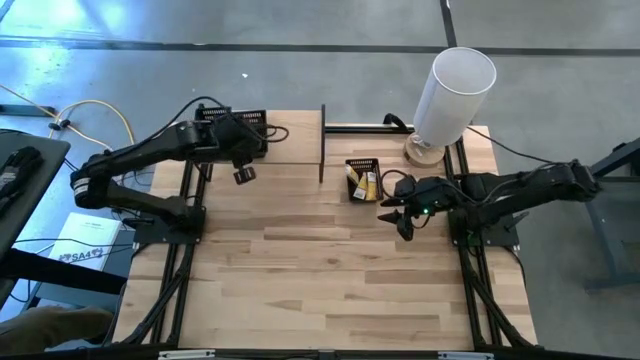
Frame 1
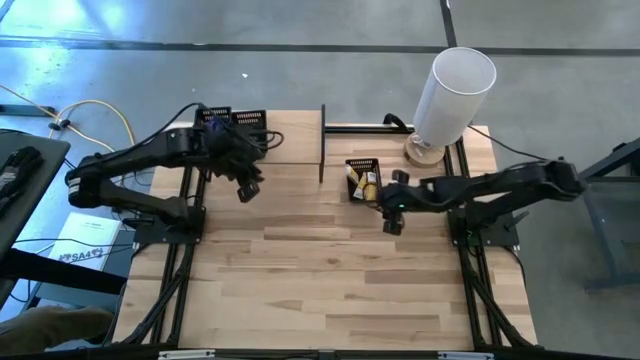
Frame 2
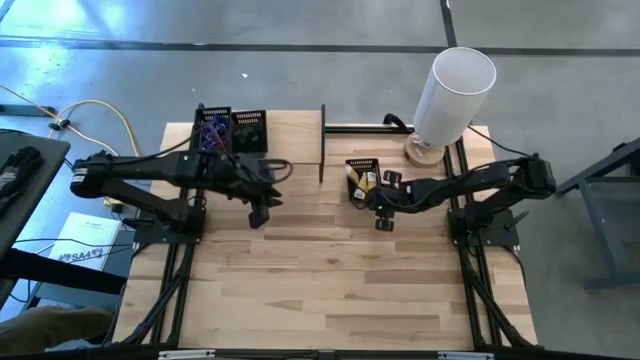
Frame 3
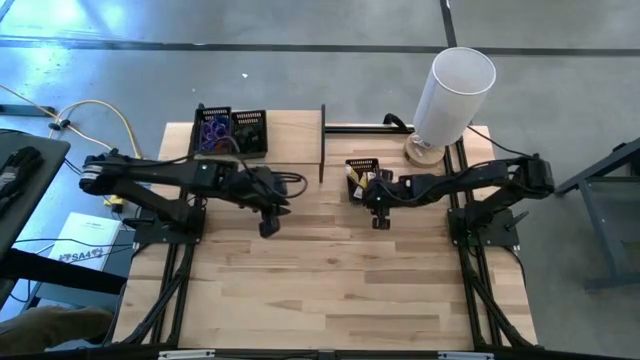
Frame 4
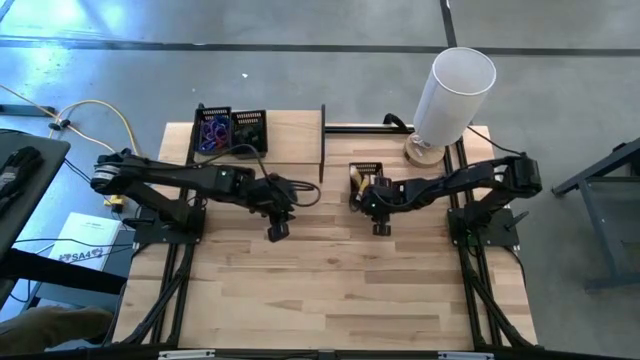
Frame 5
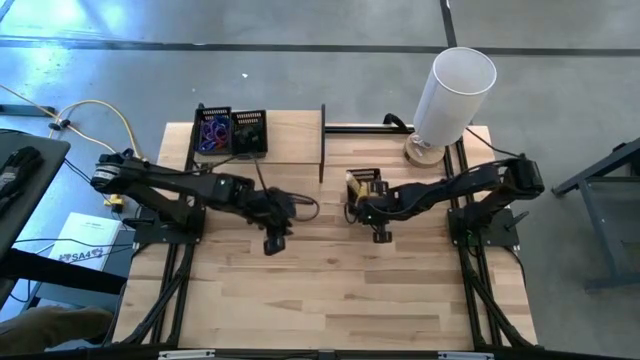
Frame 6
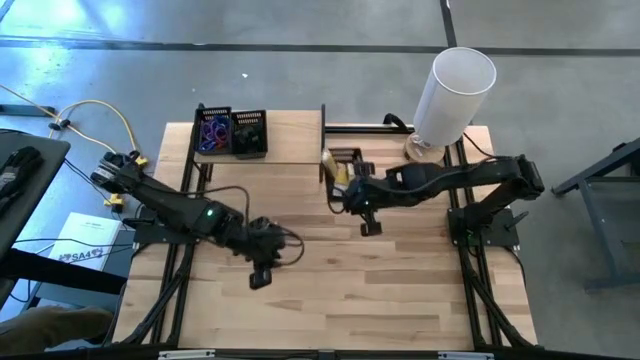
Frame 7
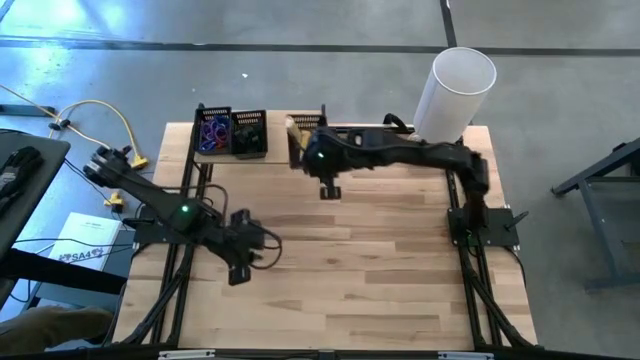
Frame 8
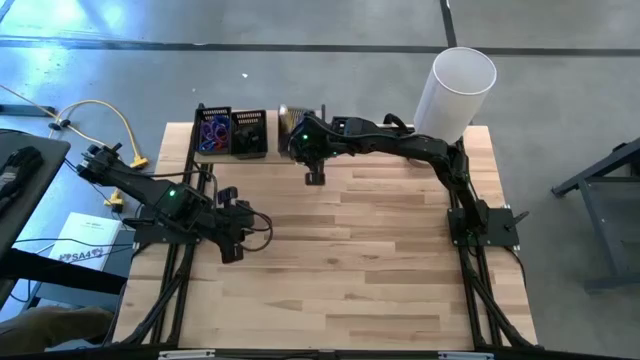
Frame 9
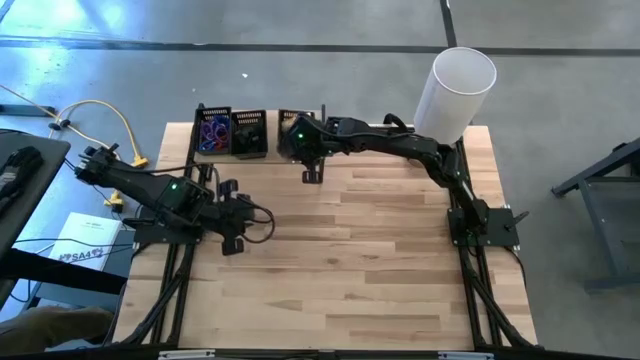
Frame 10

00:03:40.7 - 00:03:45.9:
Task: Pick & Place Office Desk Supplies
Put the black bin with crayon boxes on the shelf

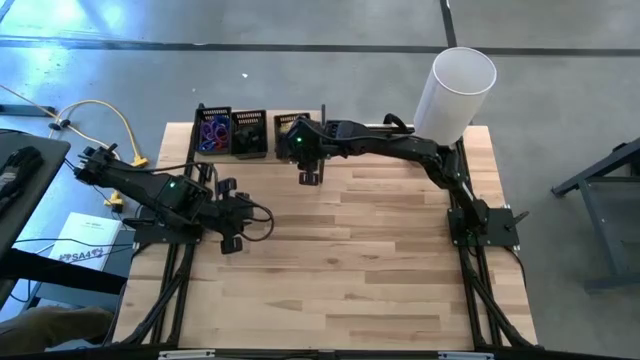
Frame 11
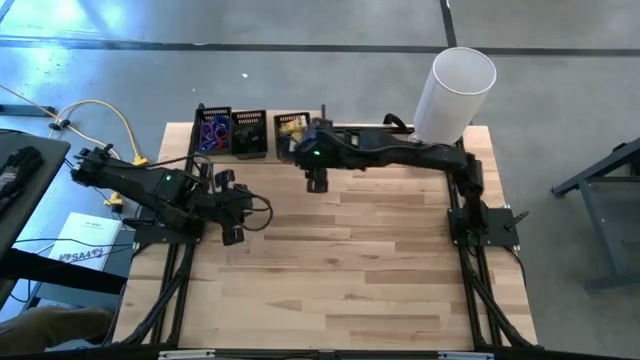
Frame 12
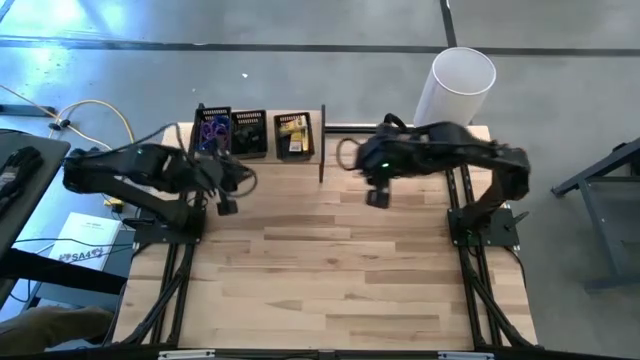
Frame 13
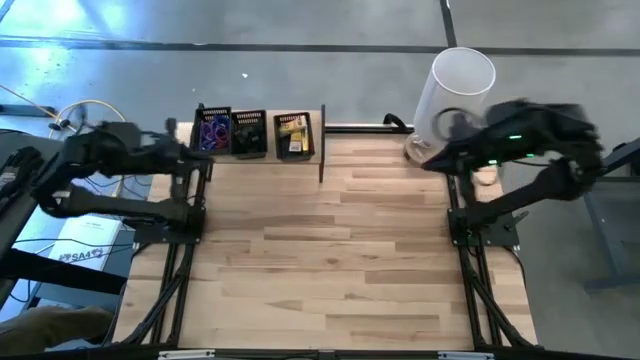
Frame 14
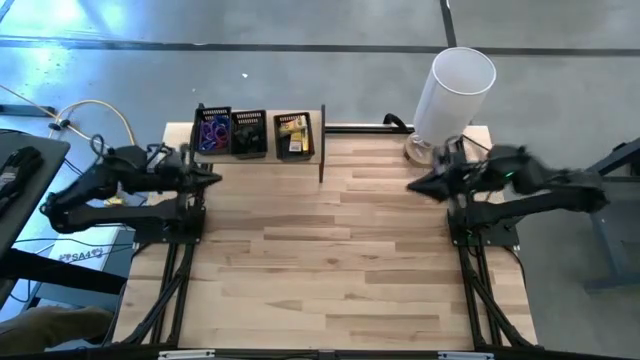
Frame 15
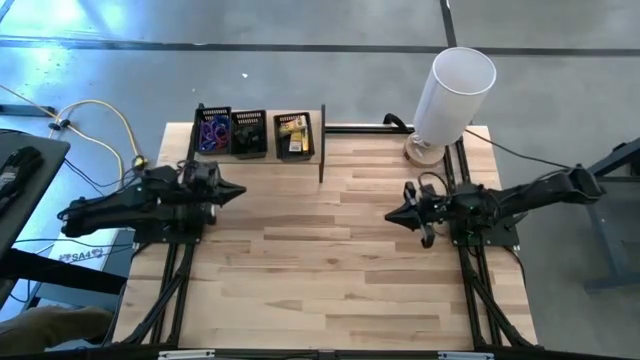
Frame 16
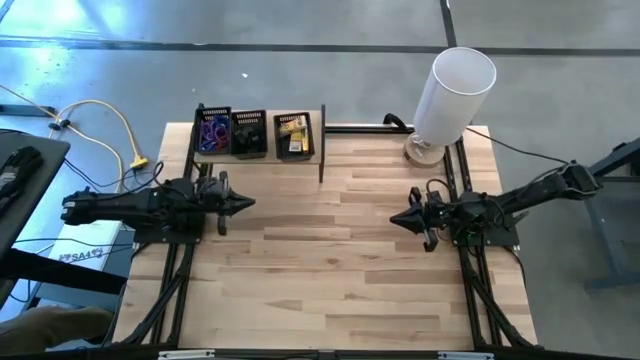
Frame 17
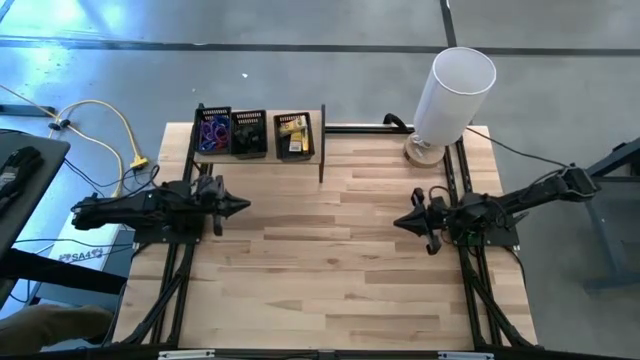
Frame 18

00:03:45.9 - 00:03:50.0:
Return to Home Position

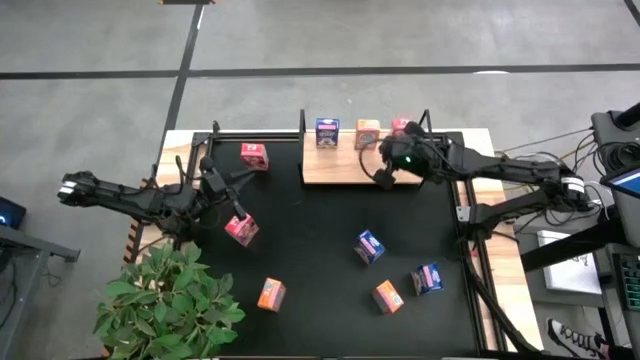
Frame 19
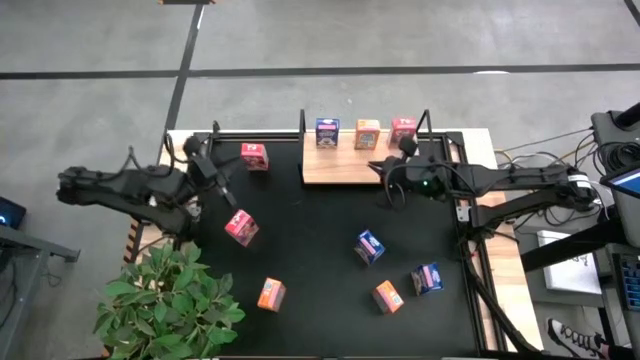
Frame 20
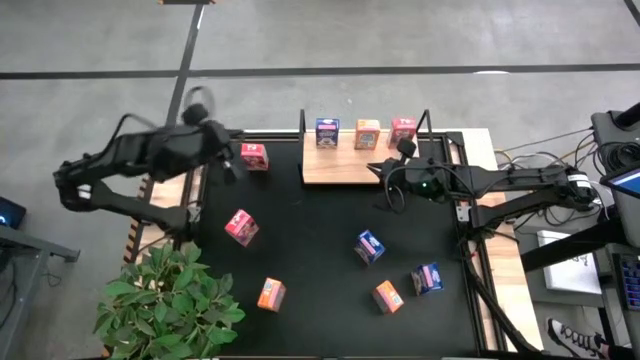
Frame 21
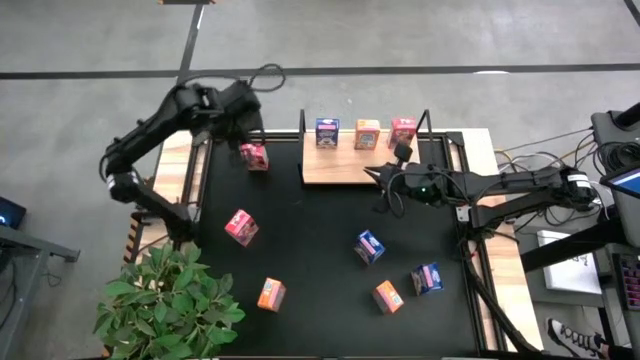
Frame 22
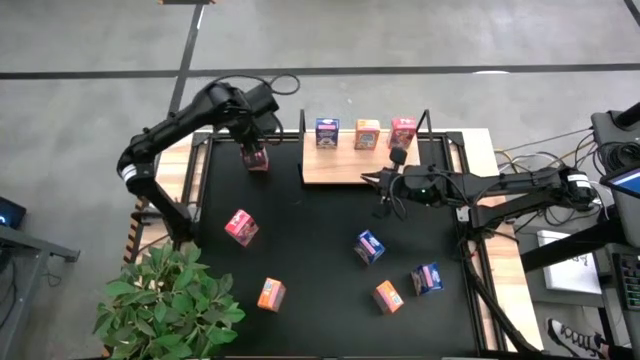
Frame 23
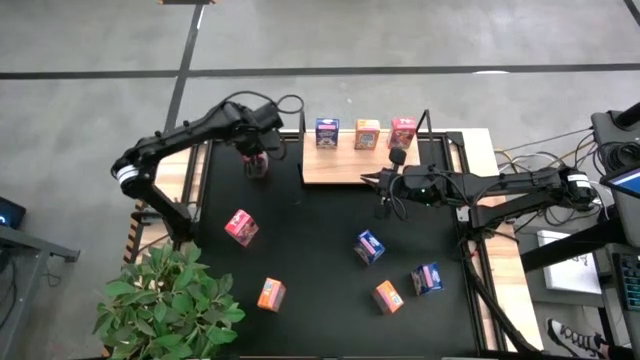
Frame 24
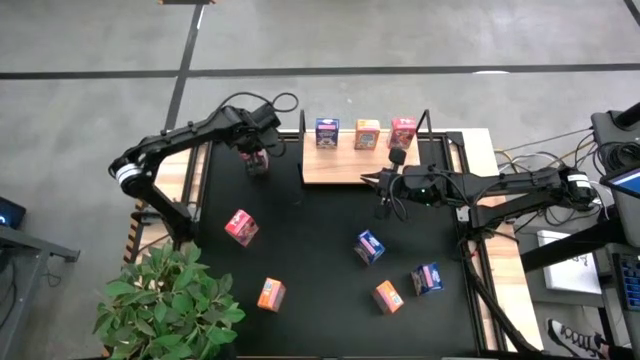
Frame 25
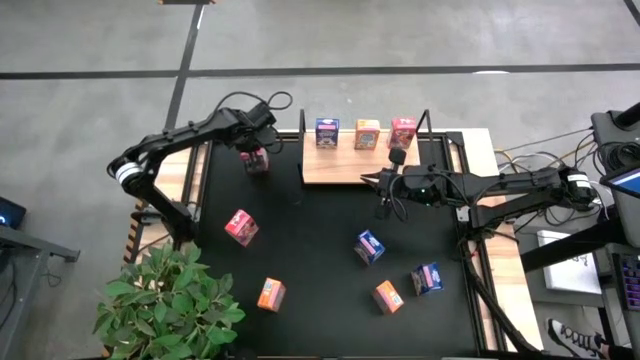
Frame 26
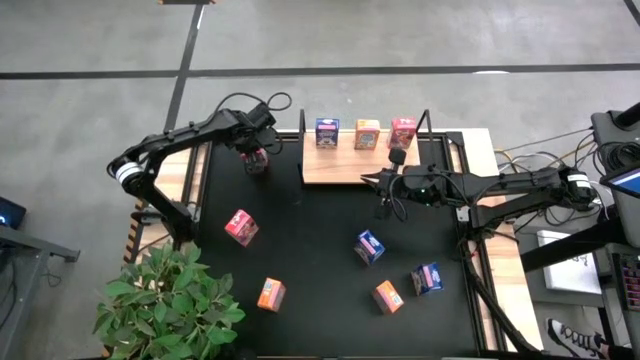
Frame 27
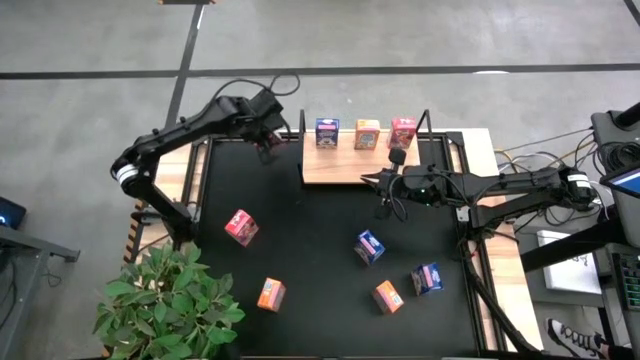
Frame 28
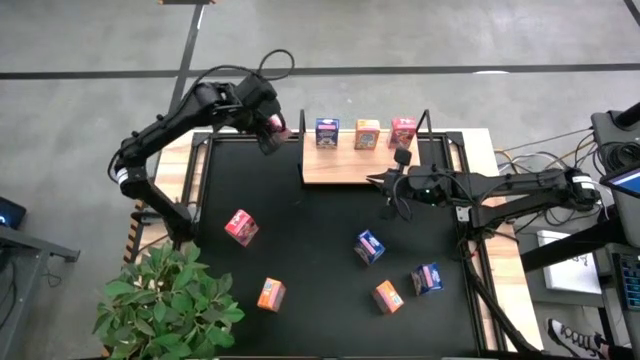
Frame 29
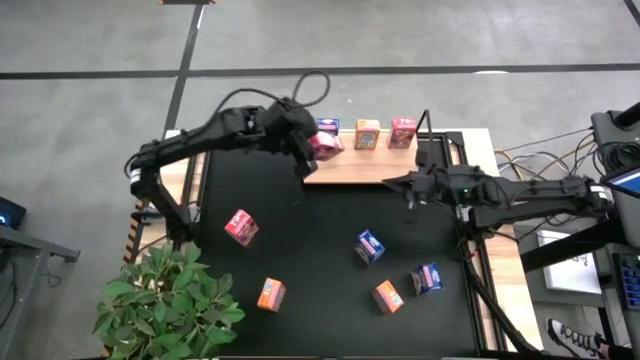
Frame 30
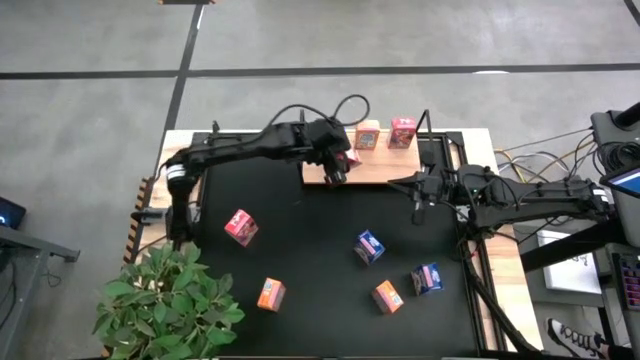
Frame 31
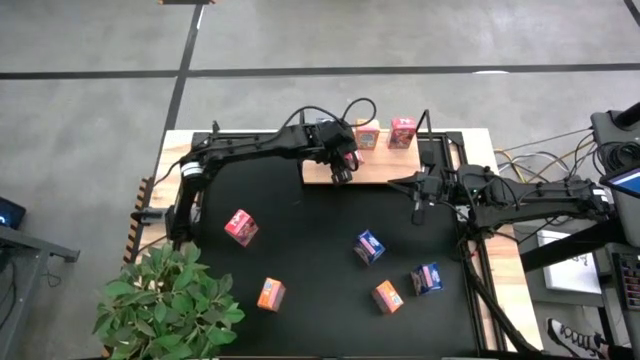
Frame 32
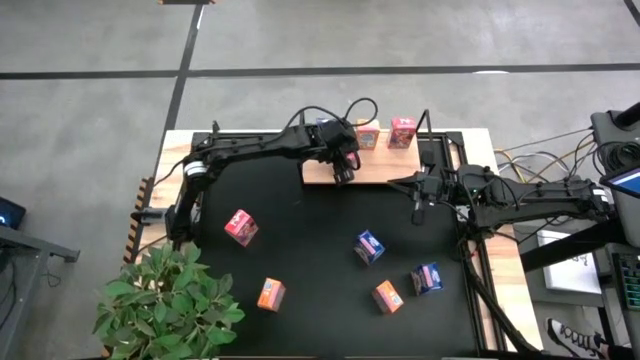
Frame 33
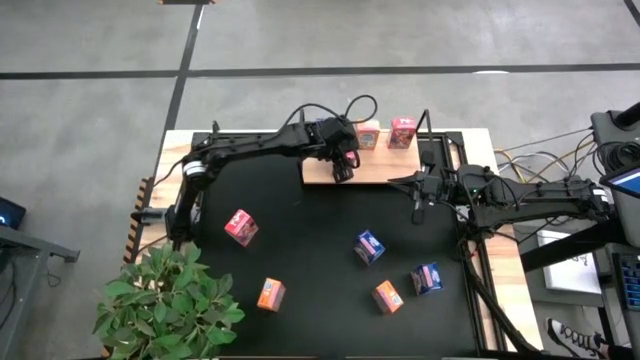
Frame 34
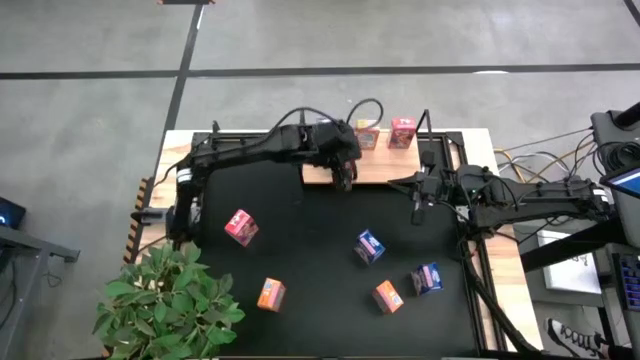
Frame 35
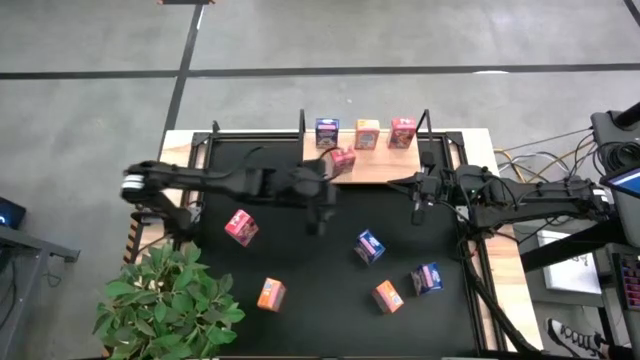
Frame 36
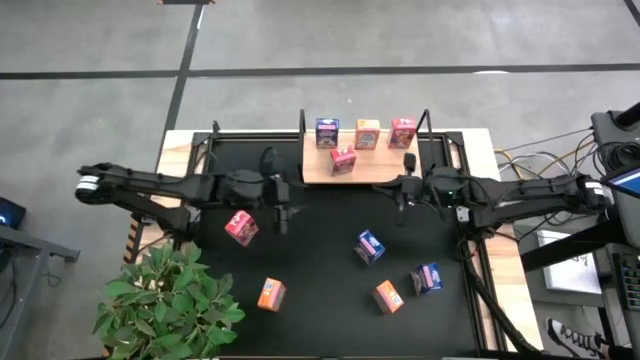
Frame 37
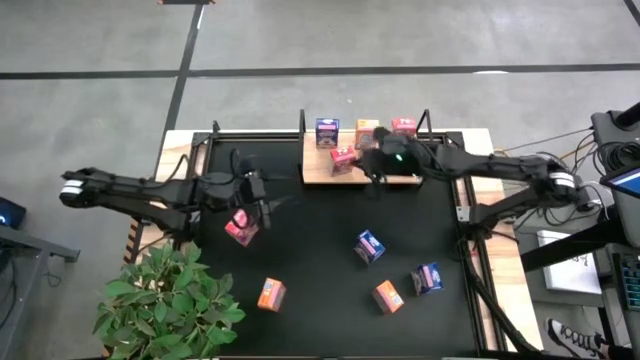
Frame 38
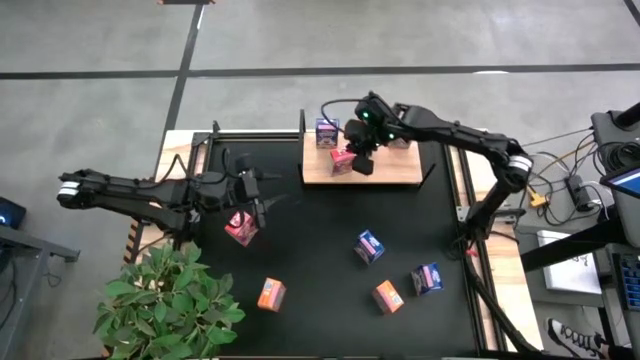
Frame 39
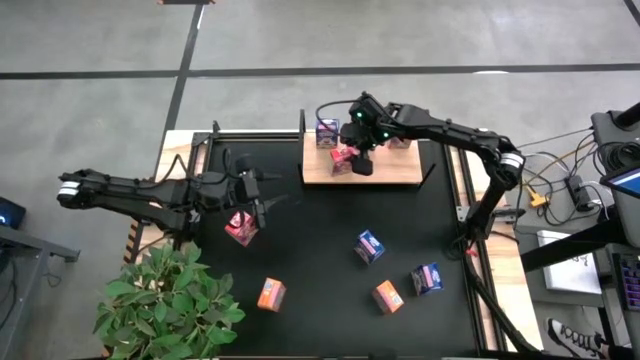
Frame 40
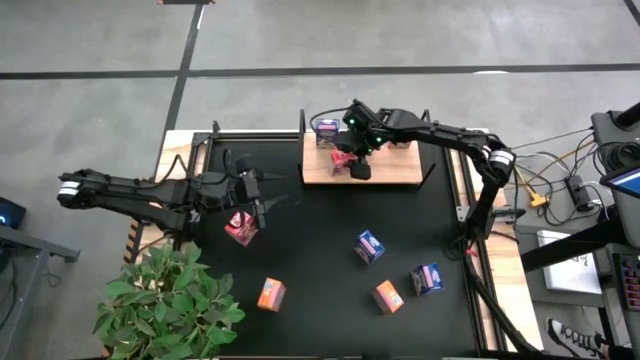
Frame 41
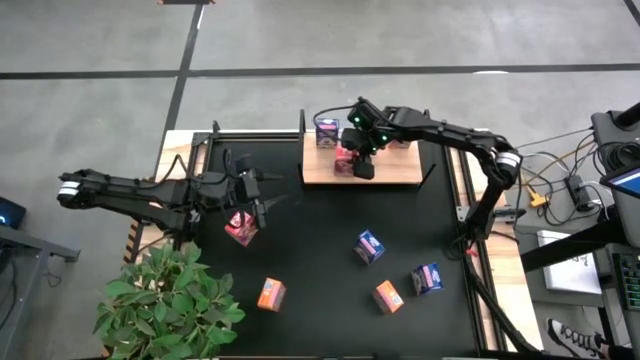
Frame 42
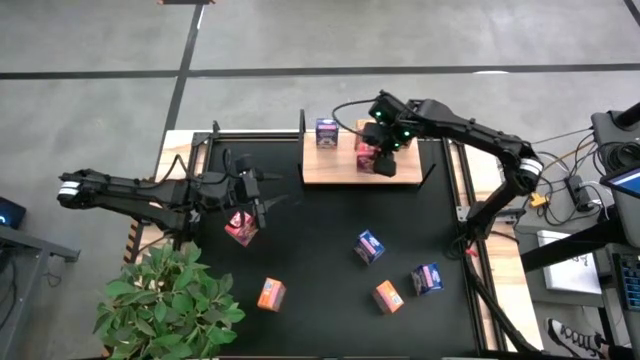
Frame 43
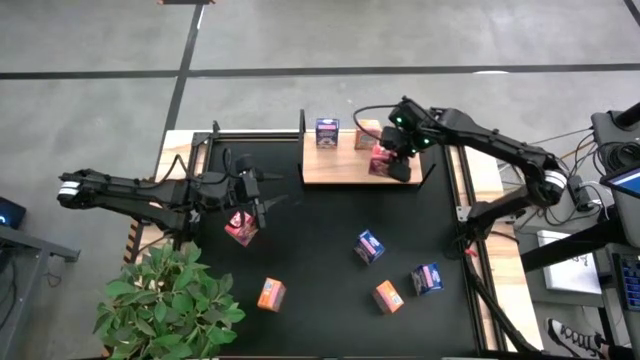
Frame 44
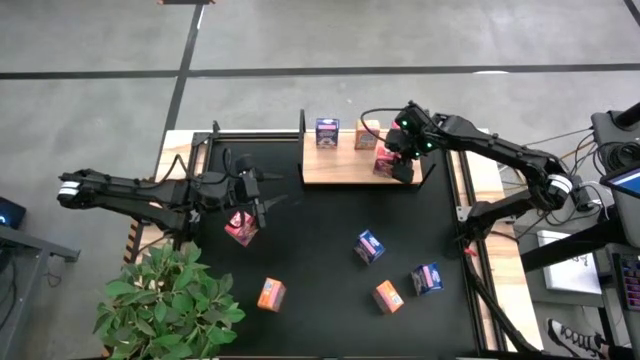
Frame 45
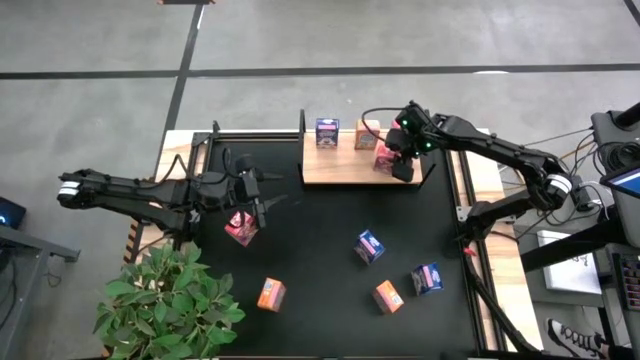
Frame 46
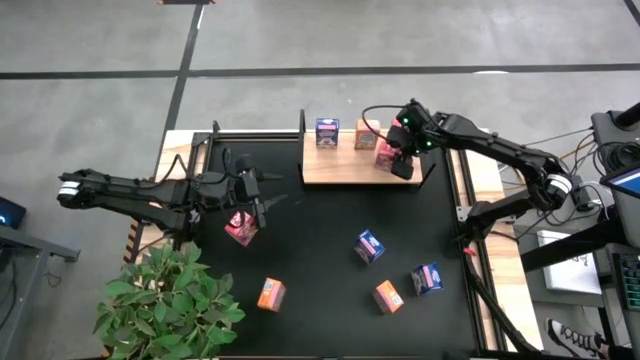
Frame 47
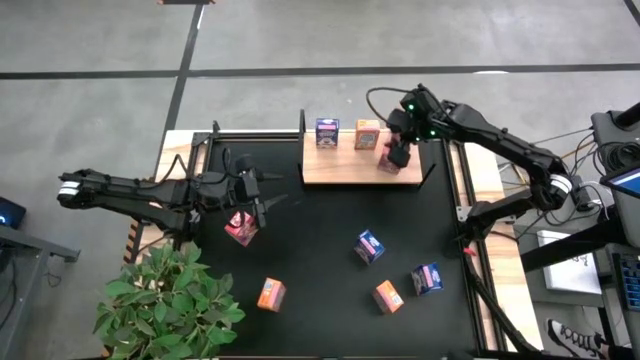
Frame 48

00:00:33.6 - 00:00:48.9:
Task: Stack cereal on shelf
Put the top red cereal box on the shelf aligned with the other red cereal box
